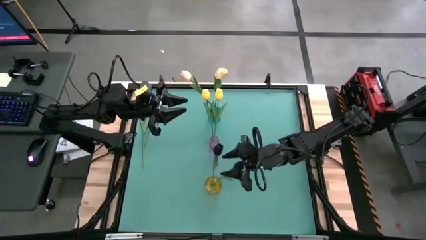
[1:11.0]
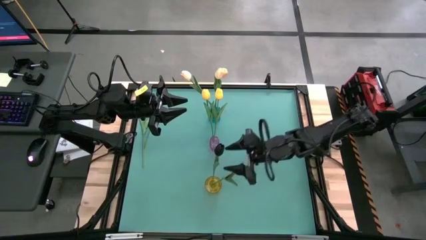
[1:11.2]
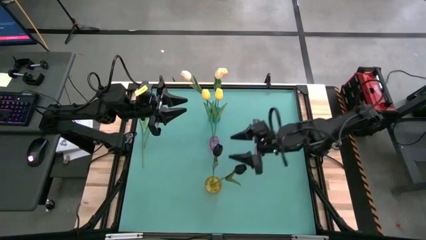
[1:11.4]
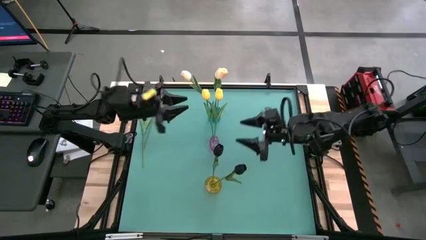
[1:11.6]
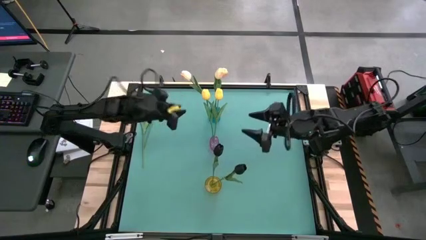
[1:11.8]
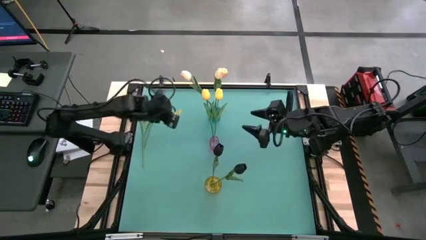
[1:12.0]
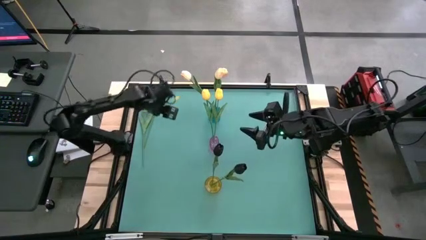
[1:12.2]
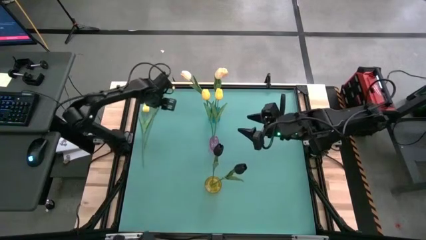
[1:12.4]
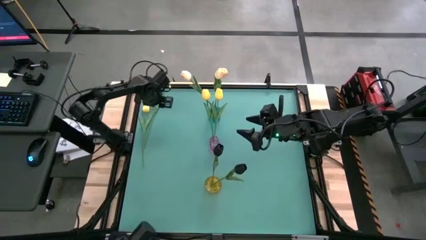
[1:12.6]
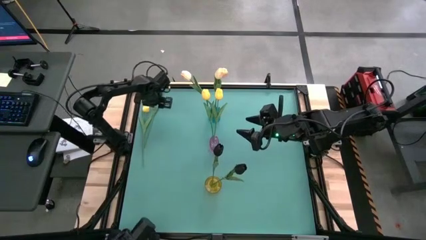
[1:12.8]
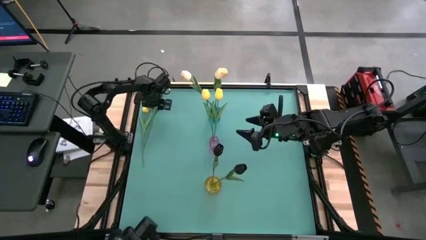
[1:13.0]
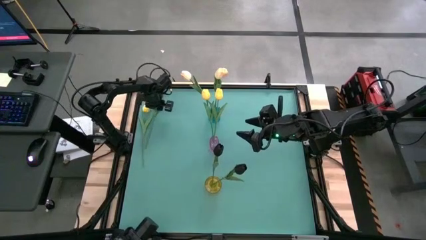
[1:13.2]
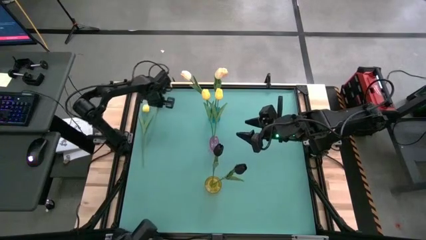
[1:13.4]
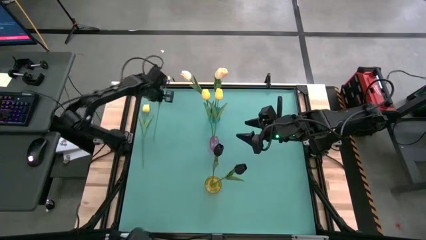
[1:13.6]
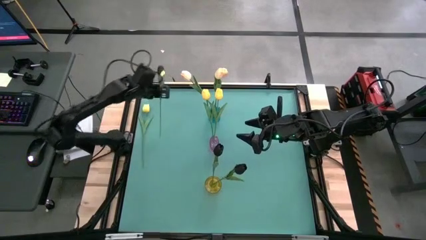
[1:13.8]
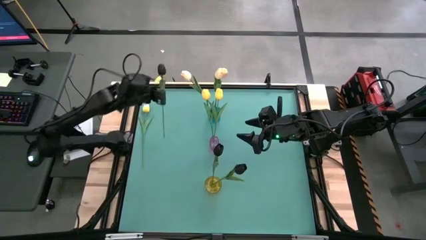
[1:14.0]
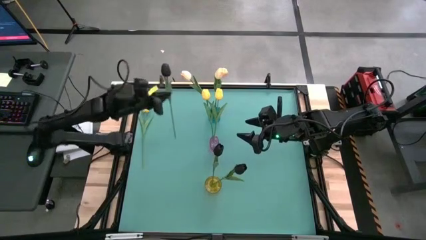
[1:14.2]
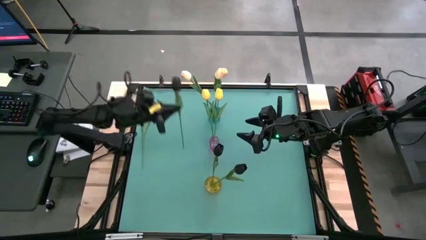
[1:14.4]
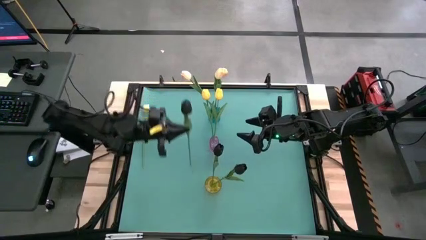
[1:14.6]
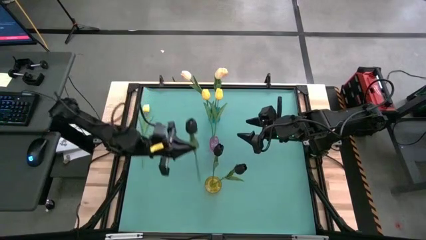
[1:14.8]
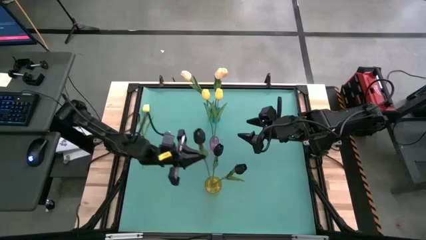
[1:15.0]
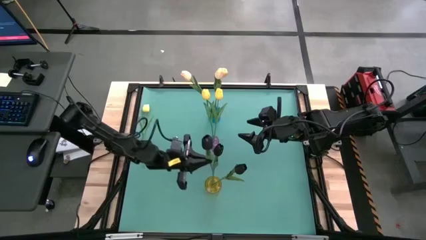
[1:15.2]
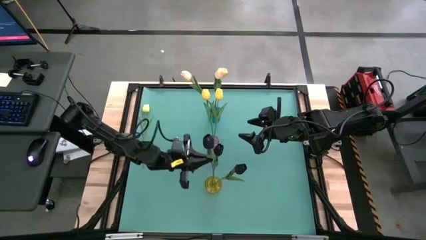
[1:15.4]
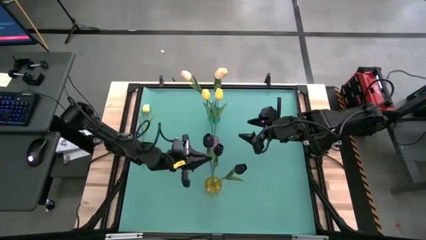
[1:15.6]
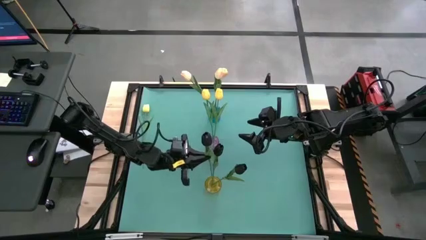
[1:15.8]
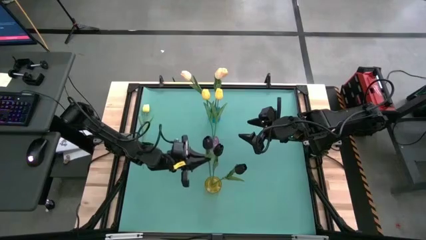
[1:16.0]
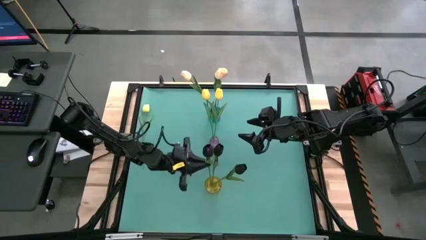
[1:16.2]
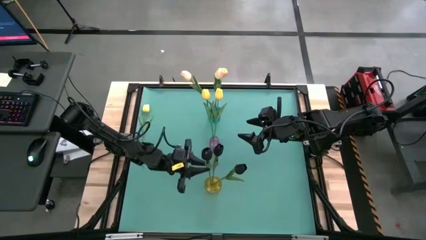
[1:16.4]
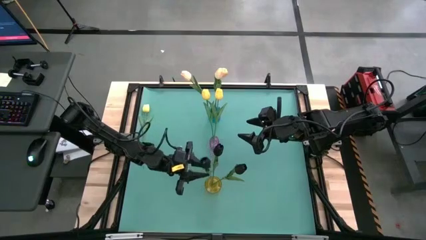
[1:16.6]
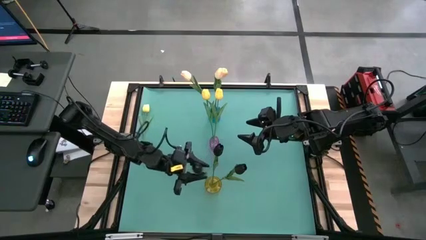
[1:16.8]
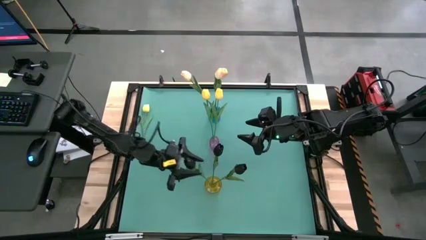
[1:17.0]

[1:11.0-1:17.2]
Task: Sort flowers into vase by color
Put the black flower into the yellow vase

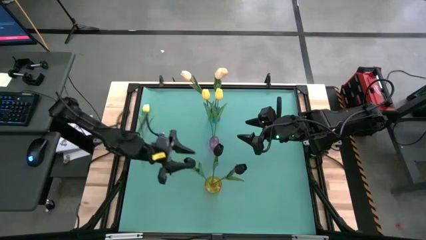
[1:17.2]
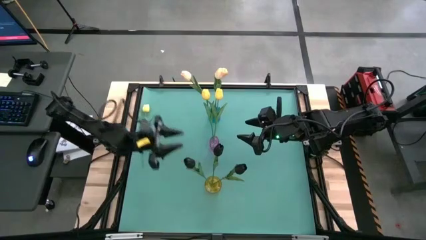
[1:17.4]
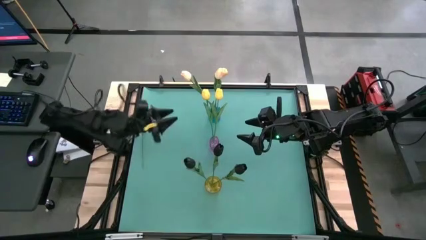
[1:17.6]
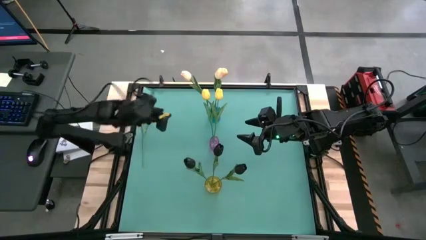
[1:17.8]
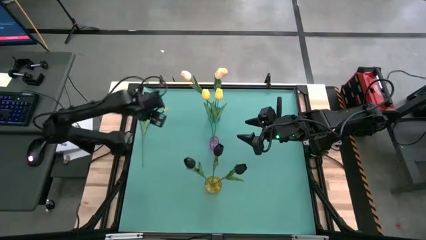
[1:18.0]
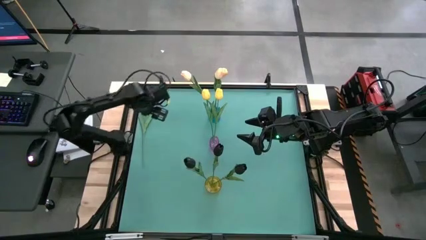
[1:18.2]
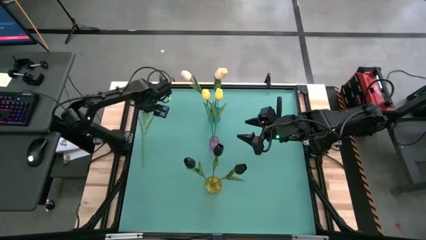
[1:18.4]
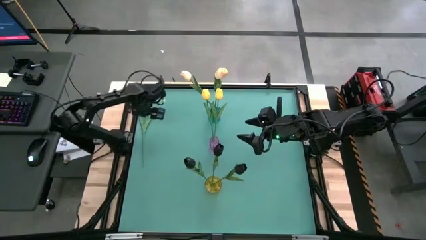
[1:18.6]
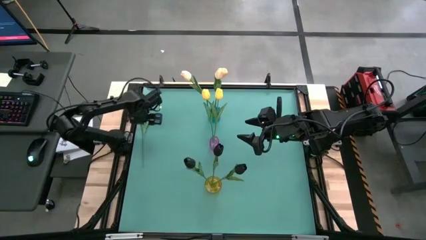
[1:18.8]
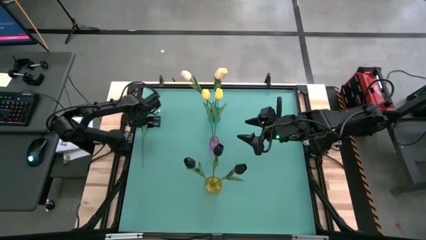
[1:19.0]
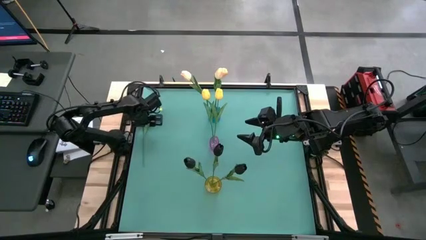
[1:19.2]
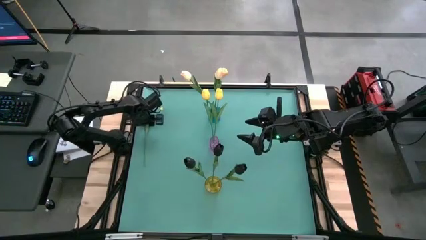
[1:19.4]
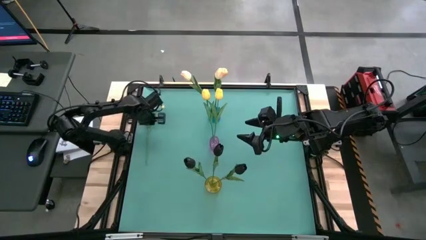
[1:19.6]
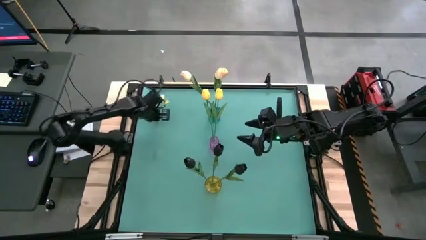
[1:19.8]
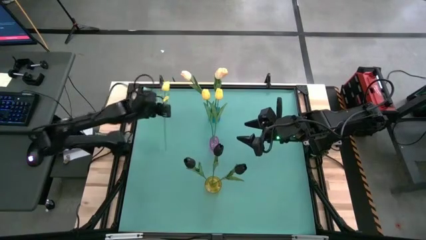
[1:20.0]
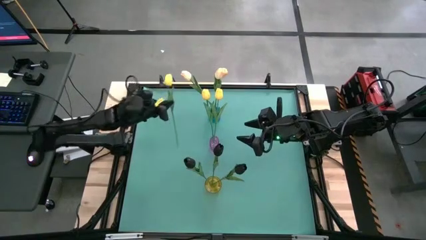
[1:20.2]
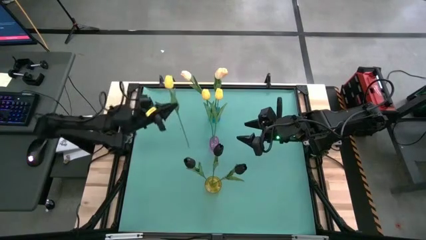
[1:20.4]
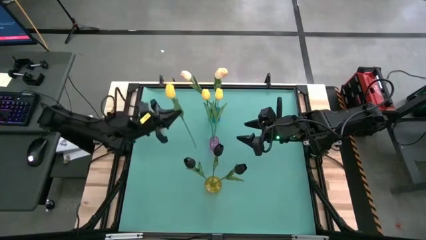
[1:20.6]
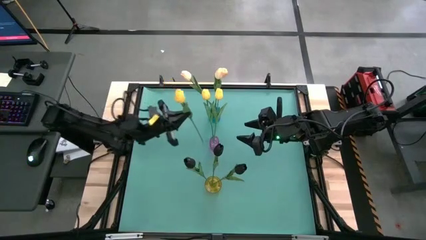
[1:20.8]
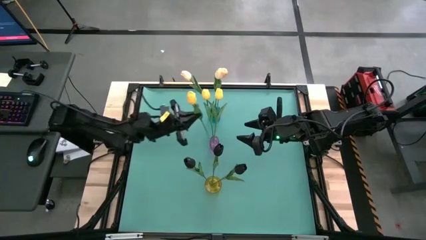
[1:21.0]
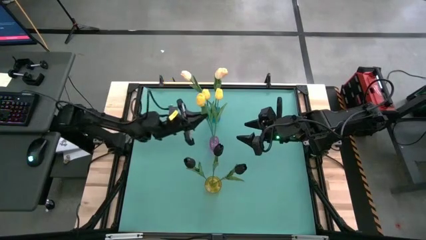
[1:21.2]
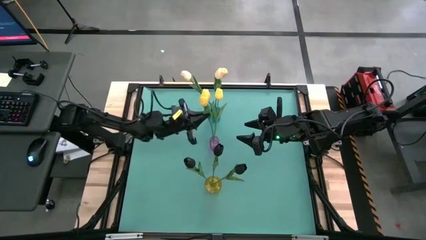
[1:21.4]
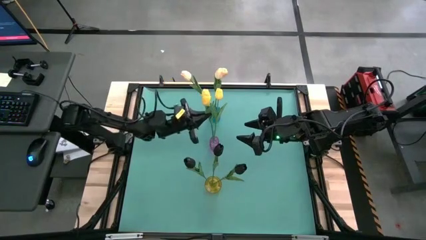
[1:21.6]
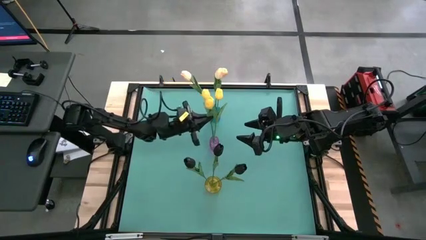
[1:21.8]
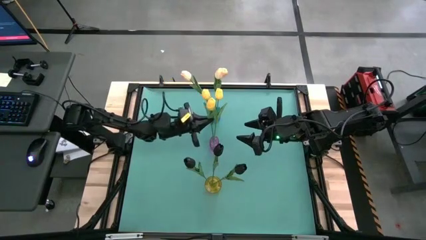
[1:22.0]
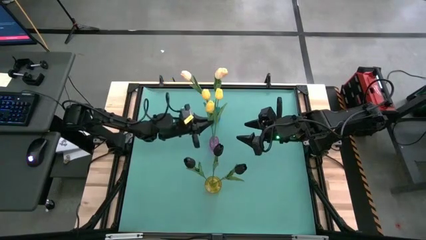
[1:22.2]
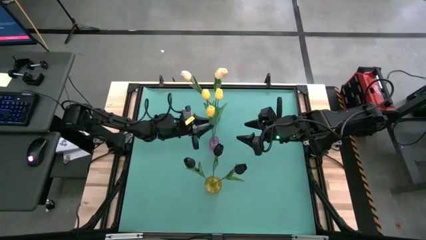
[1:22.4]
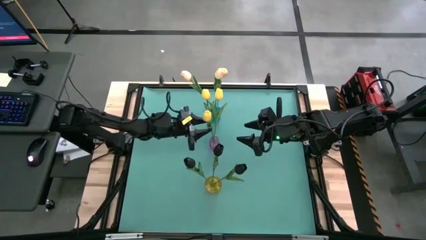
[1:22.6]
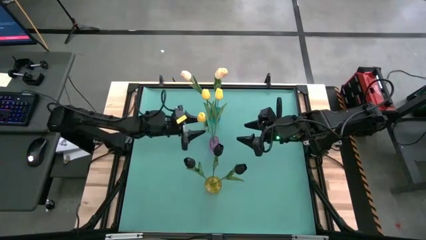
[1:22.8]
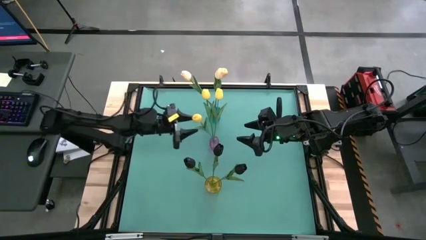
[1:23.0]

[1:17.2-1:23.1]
Put the yellow flower into the purple vase

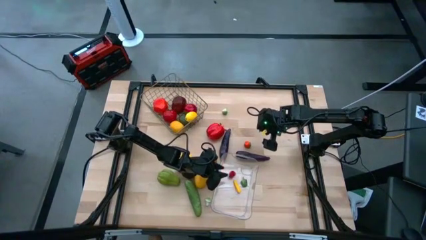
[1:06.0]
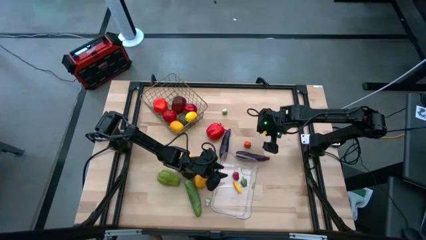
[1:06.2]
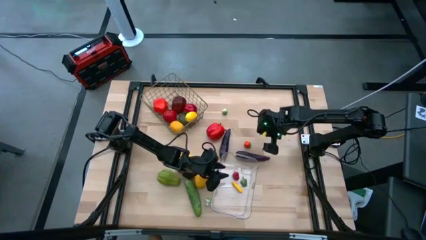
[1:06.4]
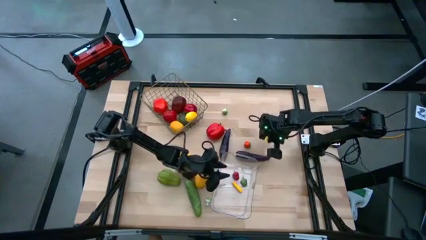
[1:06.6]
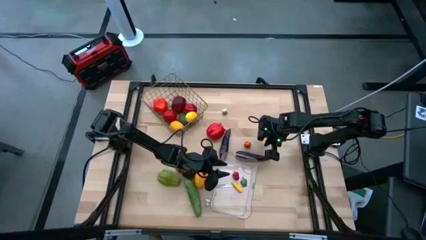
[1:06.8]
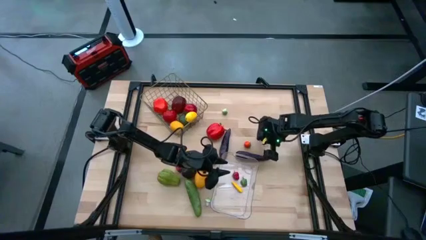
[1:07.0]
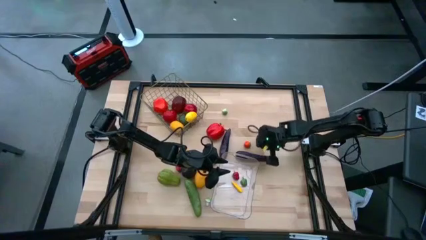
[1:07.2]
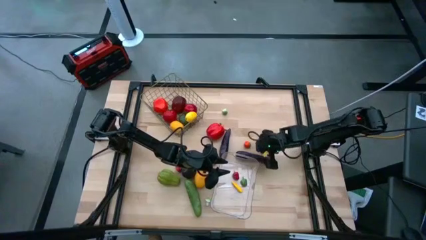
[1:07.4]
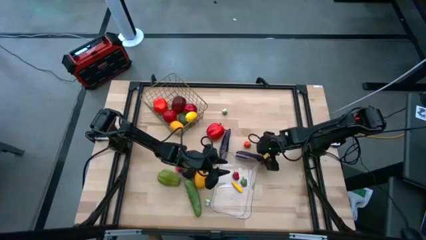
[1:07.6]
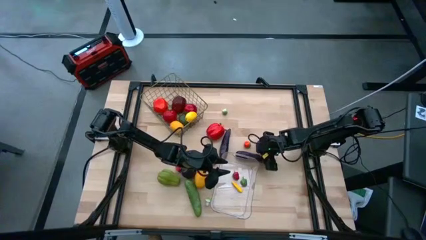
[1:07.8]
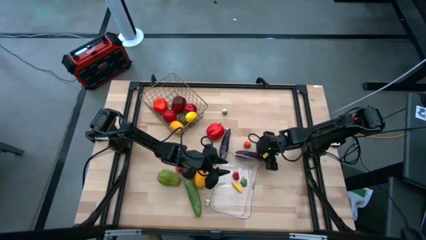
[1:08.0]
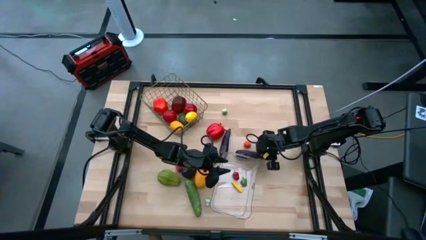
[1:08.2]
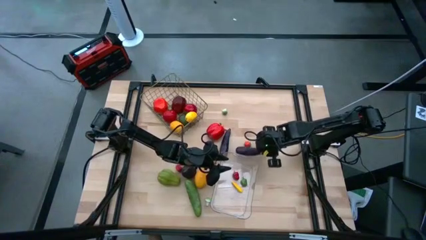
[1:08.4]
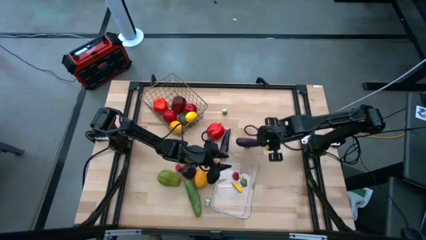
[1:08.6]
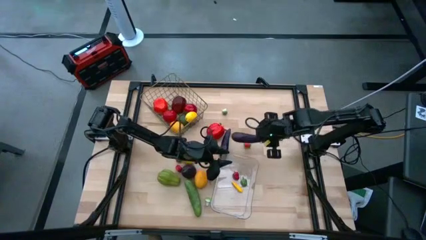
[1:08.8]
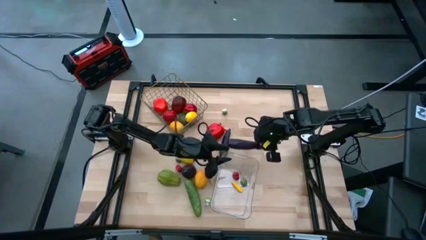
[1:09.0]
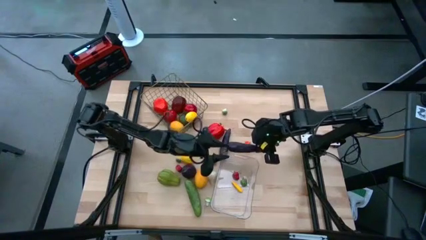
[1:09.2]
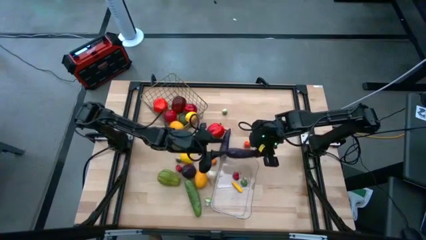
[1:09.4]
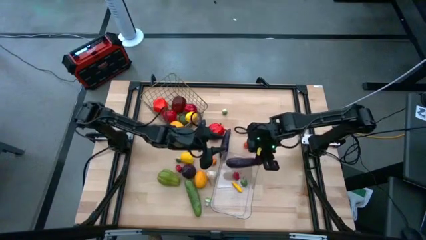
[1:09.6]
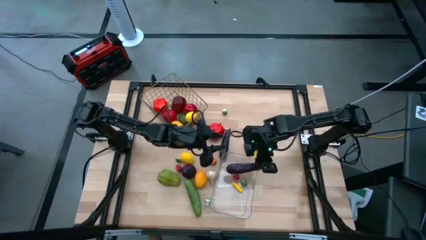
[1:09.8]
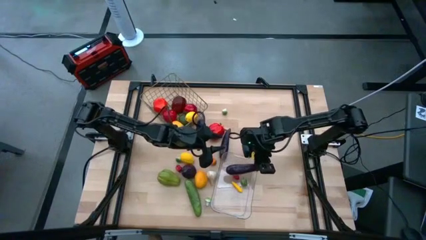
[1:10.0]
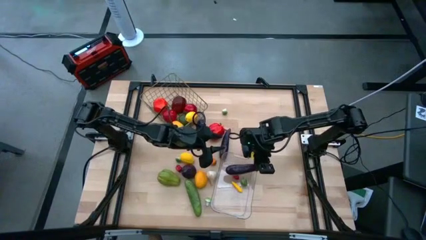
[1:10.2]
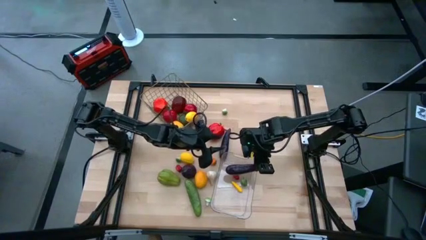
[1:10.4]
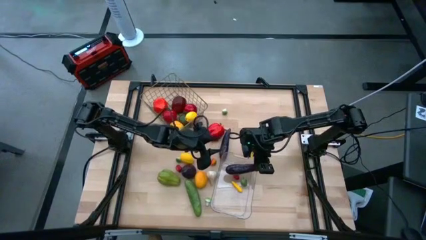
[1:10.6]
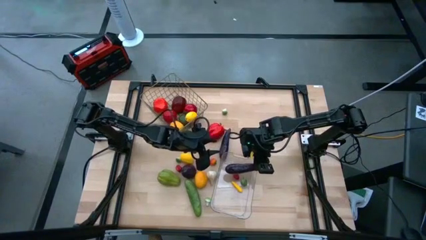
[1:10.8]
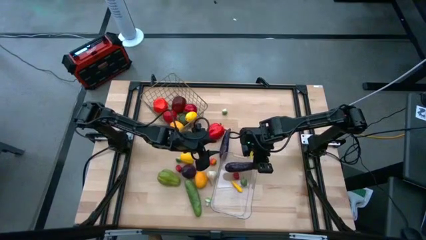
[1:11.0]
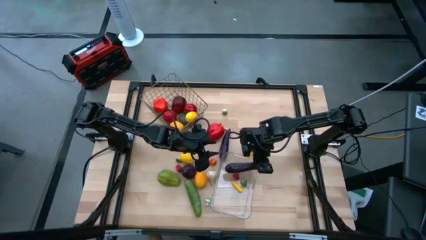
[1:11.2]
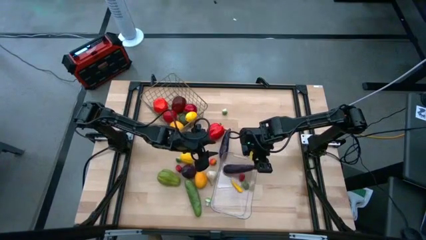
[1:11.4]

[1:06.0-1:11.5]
Task: Sort produce into baskets
Put the violet eggplant into the transparent bin
